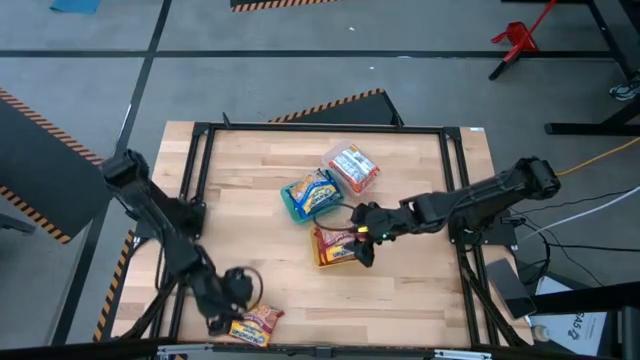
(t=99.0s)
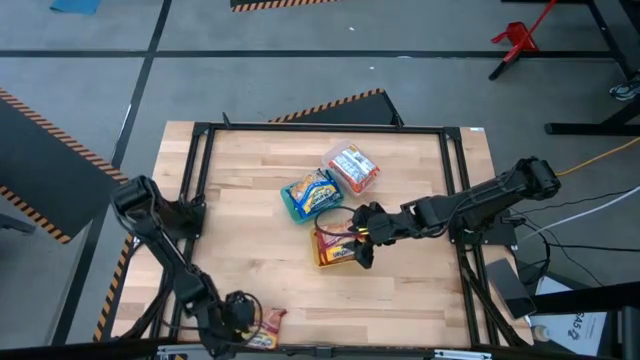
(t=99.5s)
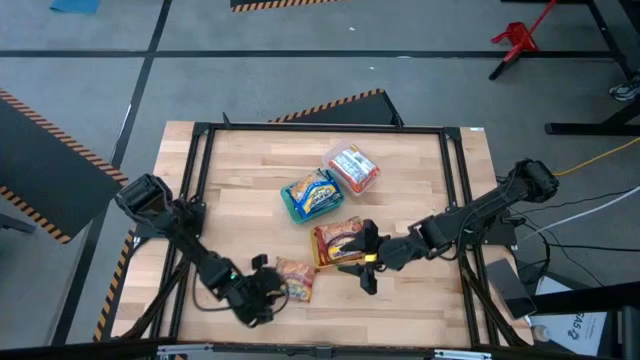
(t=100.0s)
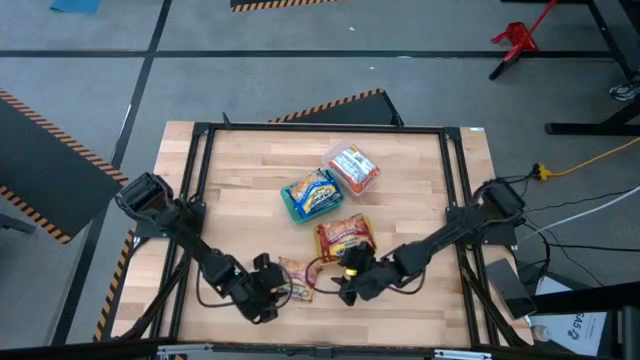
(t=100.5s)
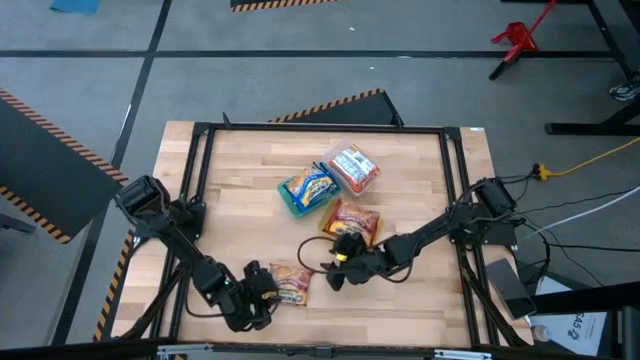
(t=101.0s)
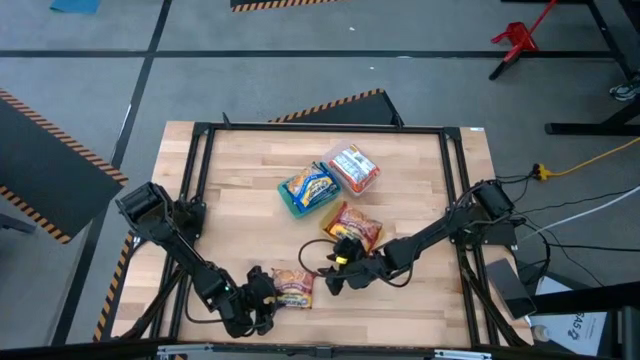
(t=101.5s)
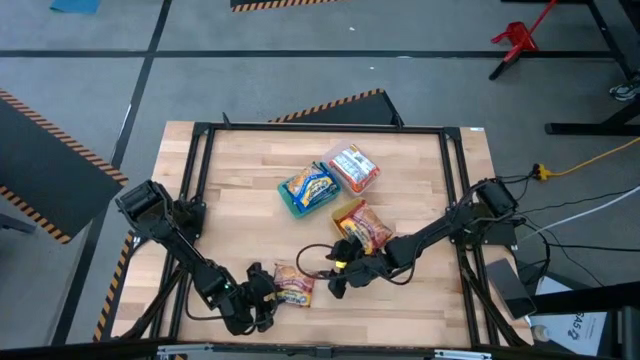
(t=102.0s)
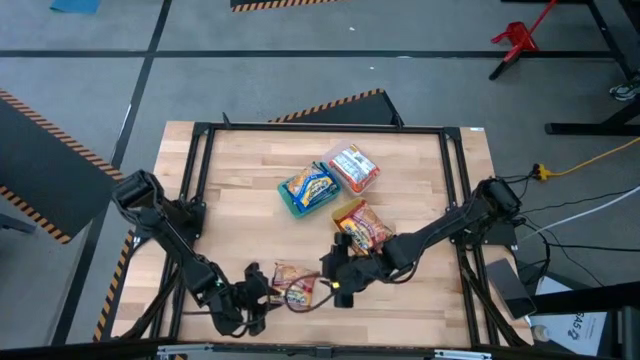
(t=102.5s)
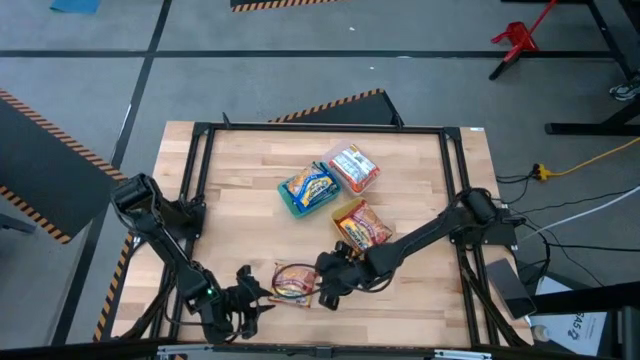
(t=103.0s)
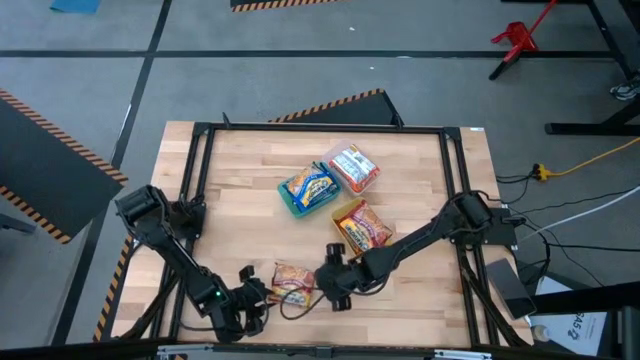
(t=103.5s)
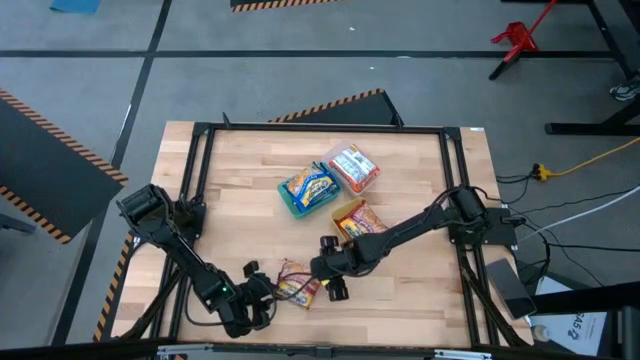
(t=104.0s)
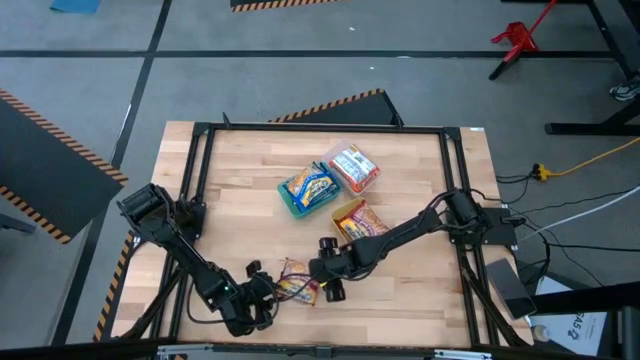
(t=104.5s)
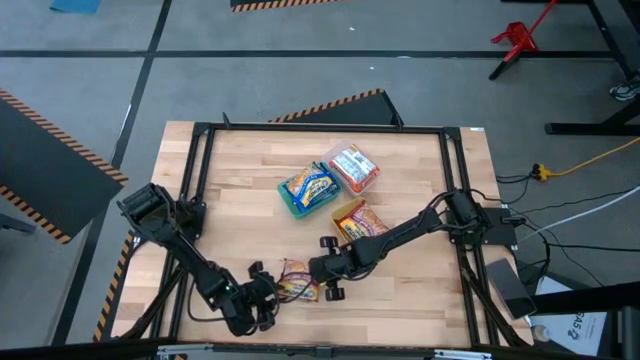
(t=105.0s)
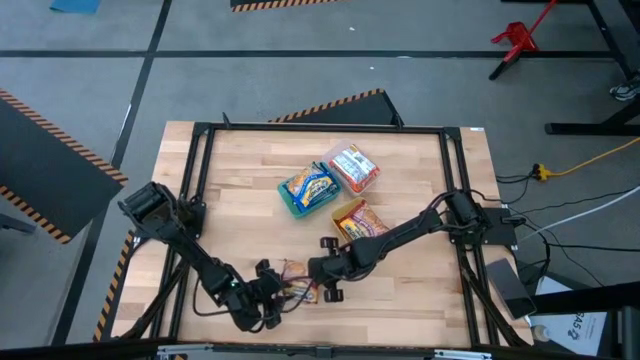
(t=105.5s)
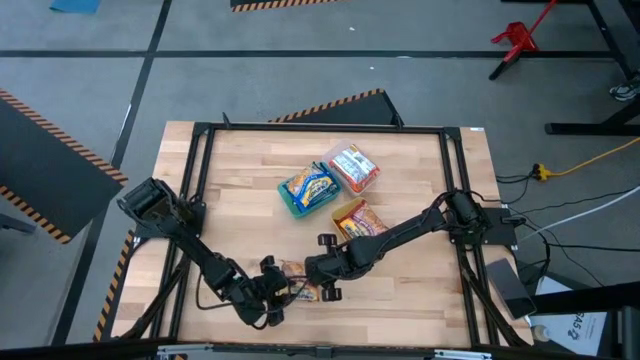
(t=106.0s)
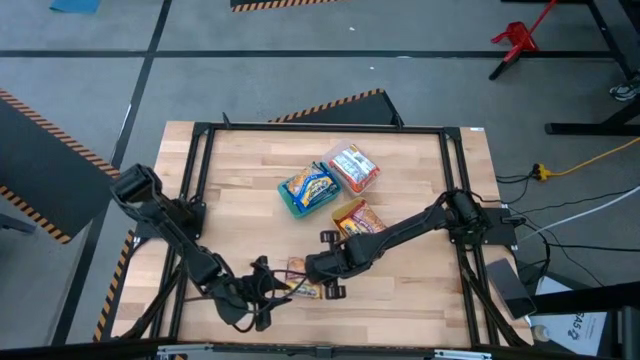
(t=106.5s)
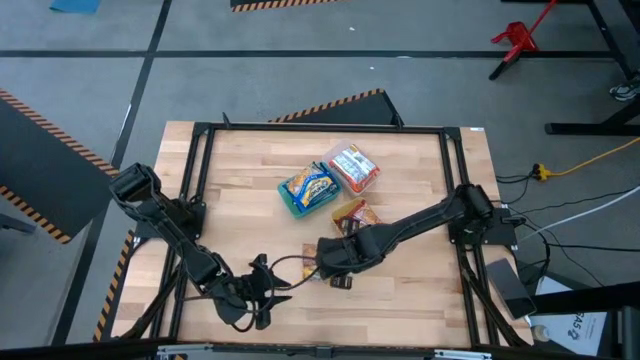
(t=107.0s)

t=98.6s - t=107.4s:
Task: Sort Maruchan noodles
Put the red noodle pack into the yellow bin

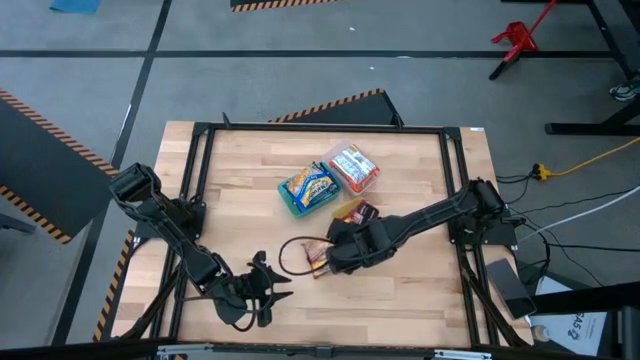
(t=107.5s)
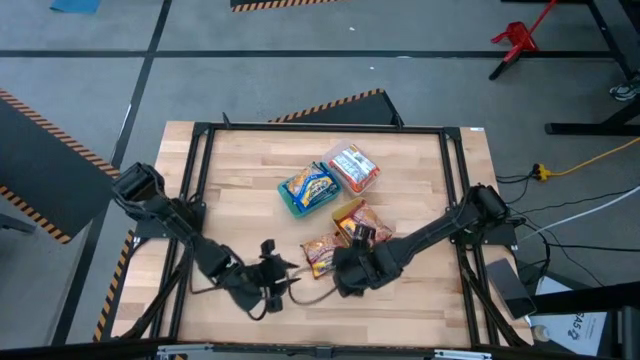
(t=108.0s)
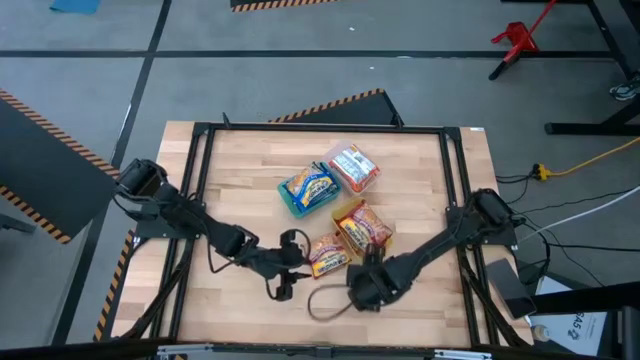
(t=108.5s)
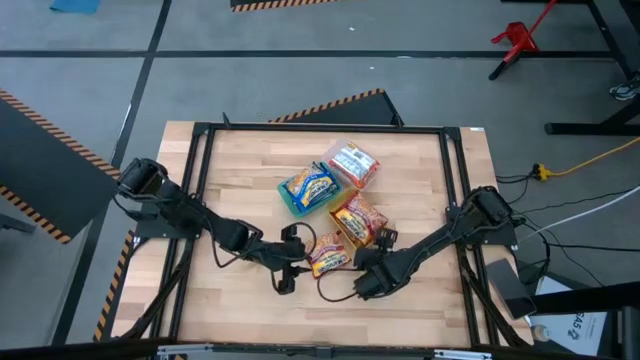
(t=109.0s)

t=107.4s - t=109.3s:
Adjust the yellow bin on the table

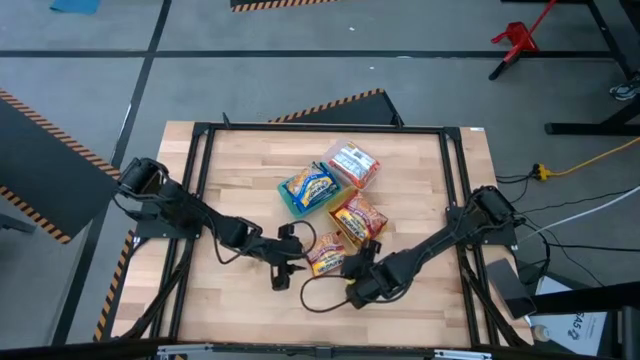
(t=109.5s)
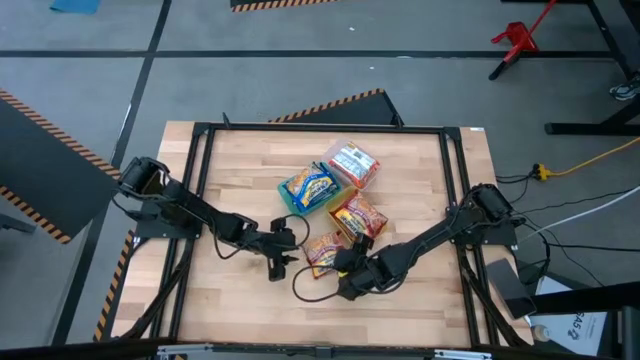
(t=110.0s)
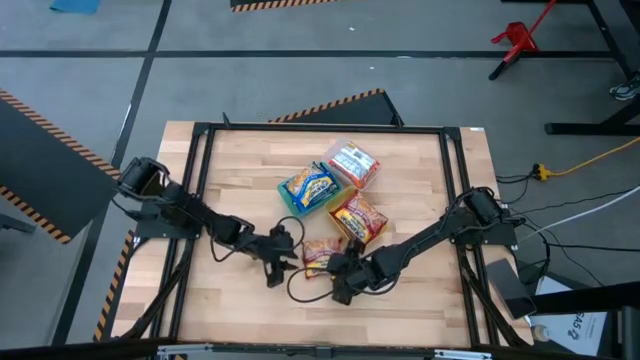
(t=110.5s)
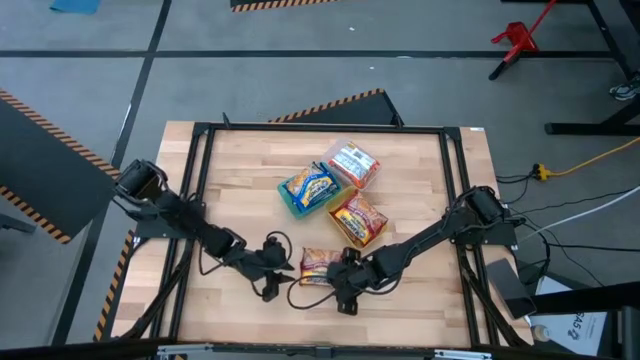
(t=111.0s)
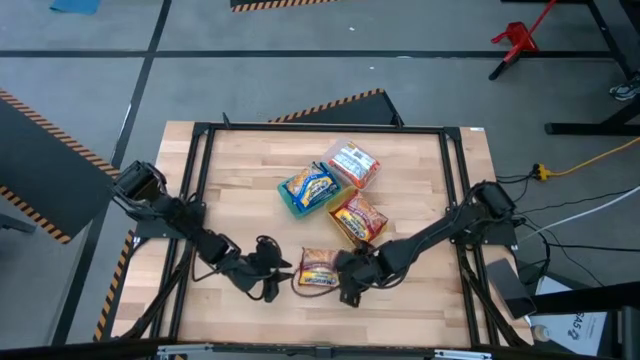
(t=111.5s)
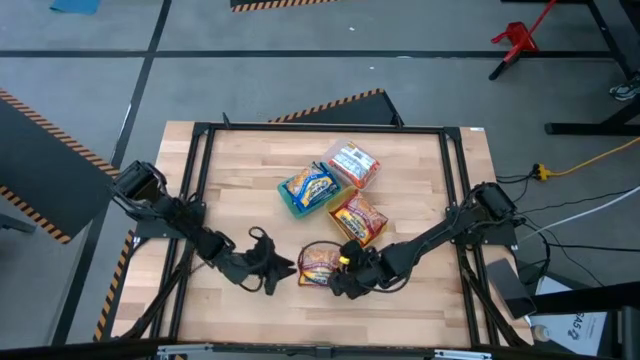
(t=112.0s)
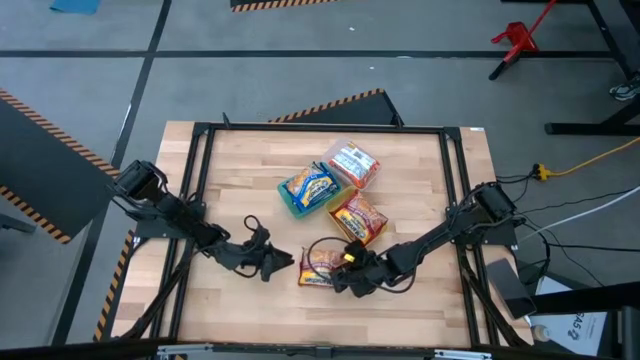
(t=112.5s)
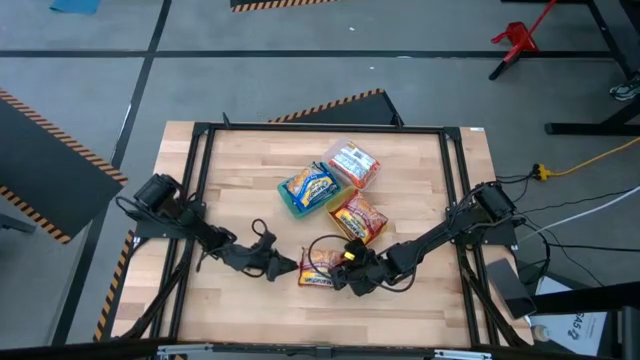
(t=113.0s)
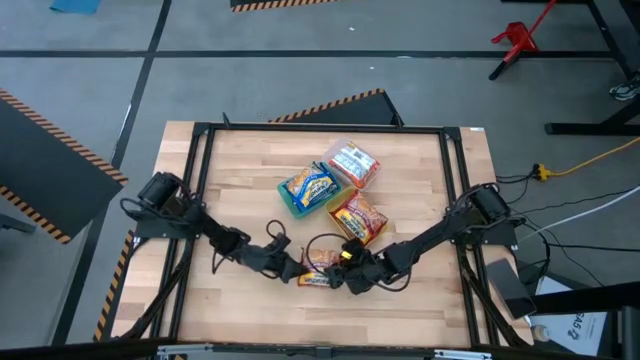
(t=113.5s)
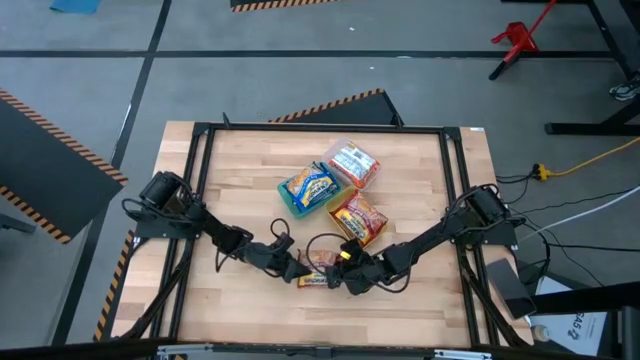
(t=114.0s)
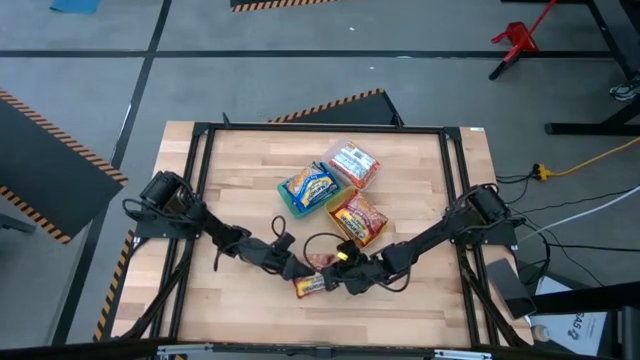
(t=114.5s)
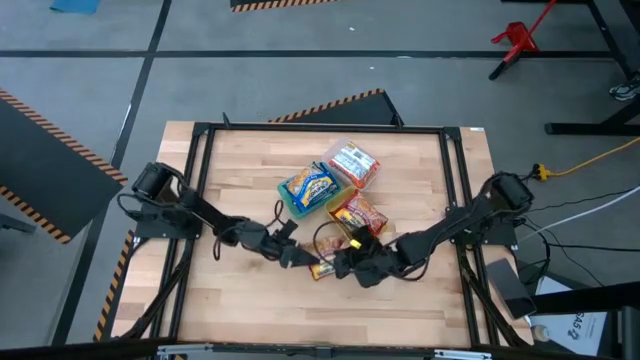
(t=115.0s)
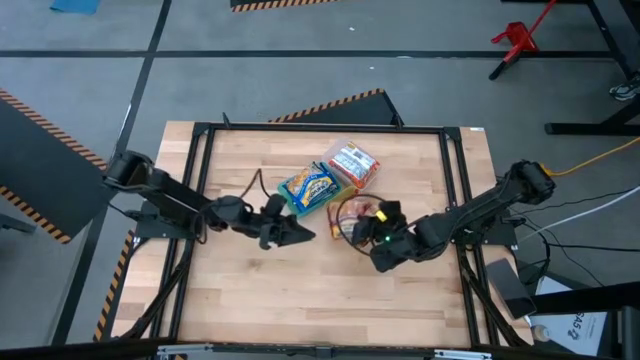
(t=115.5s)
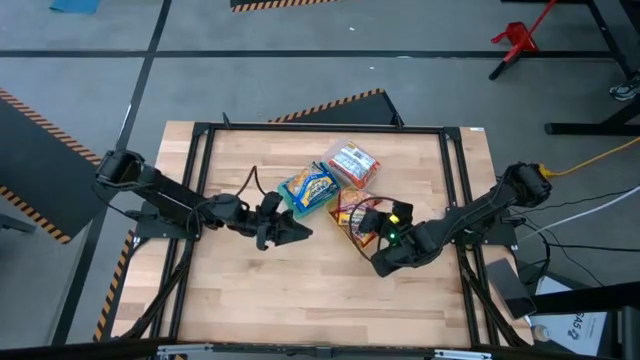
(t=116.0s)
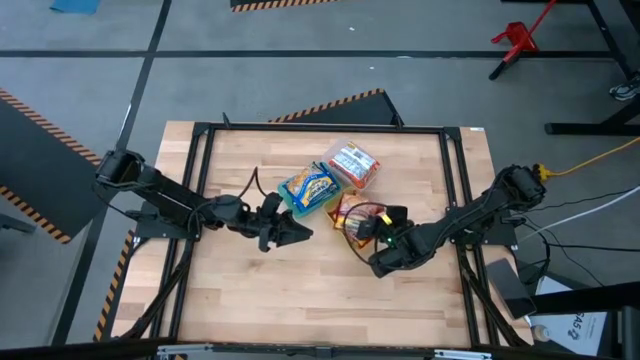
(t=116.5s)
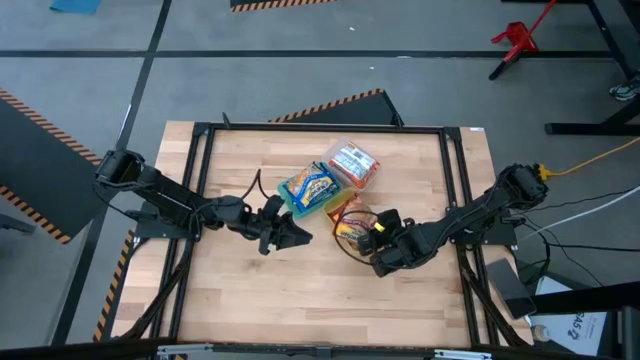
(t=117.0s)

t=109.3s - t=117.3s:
Put the red noodle pack into the yellow bin

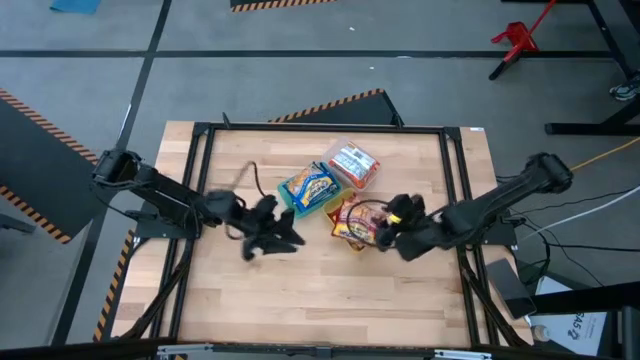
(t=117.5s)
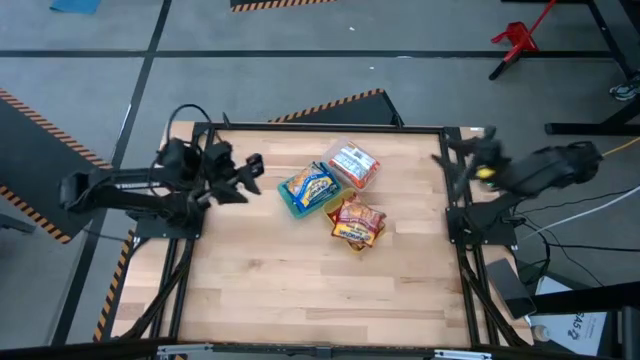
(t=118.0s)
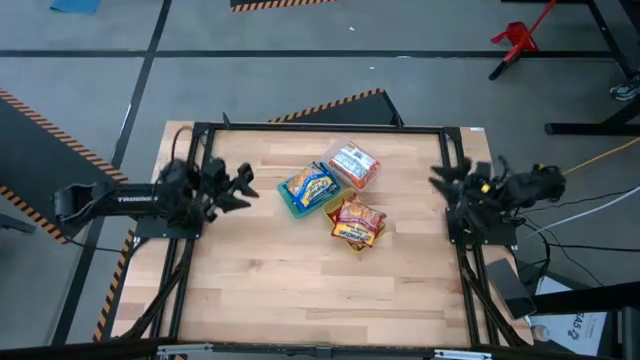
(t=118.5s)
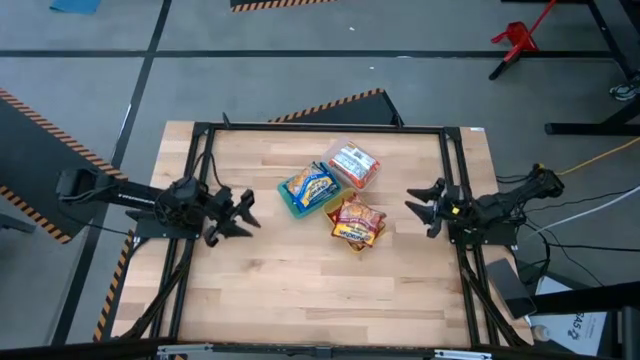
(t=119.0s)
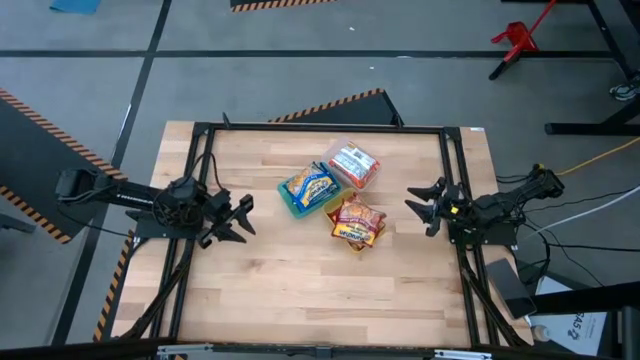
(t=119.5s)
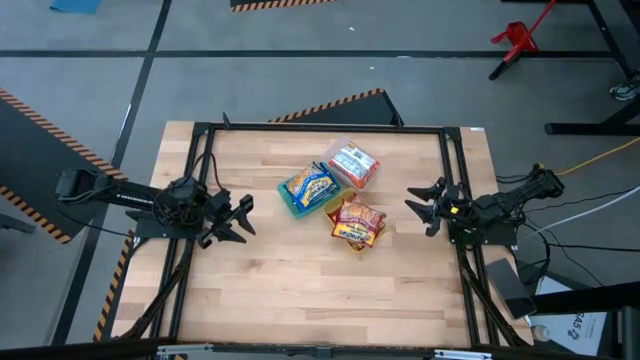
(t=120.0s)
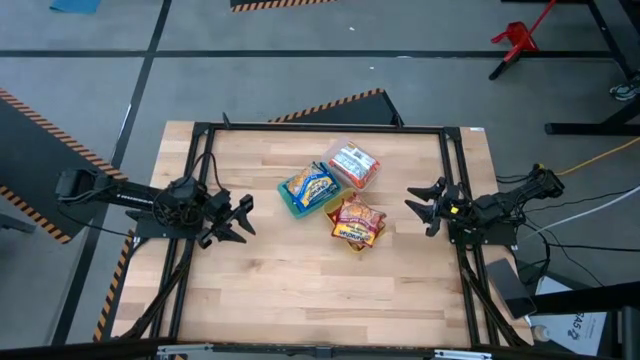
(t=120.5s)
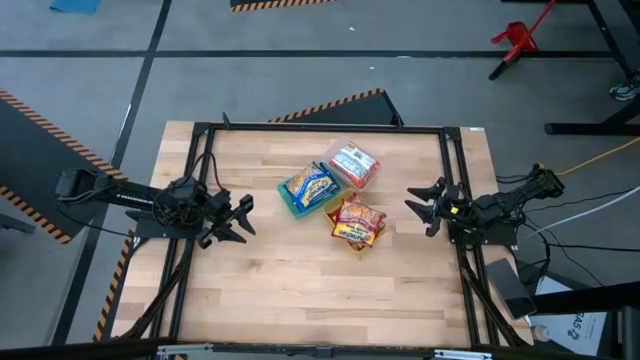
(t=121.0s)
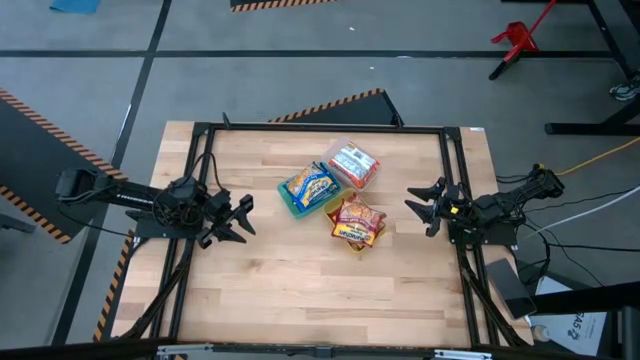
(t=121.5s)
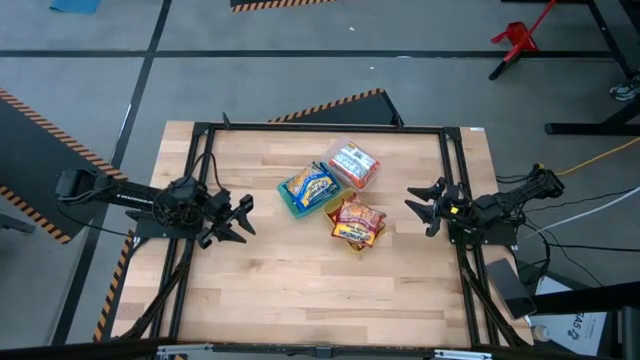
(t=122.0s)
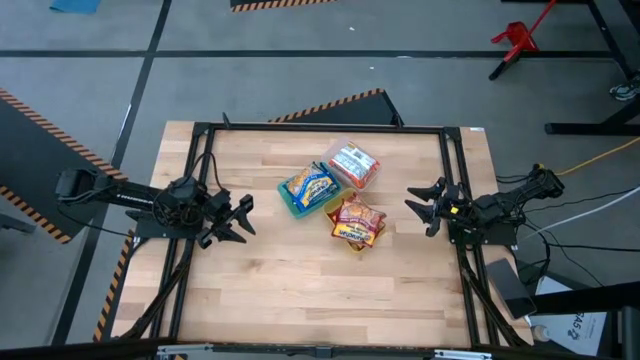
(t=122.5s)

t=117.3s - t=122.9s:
Return to Home Position
